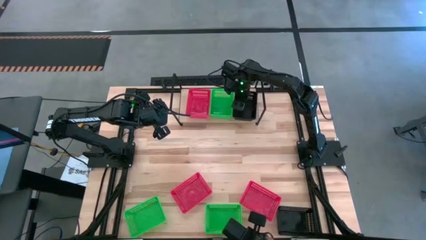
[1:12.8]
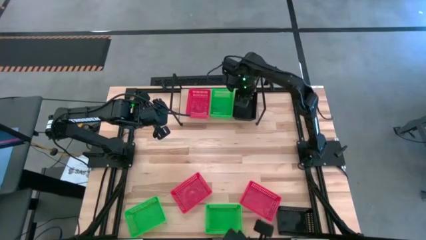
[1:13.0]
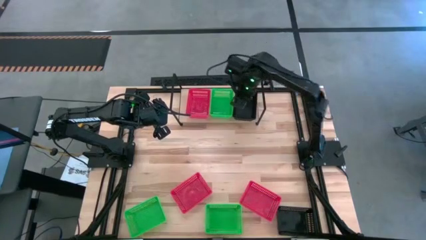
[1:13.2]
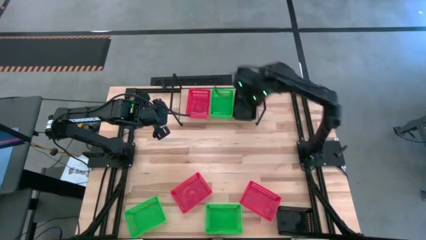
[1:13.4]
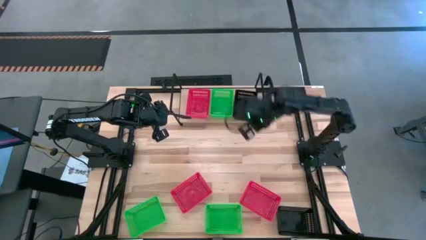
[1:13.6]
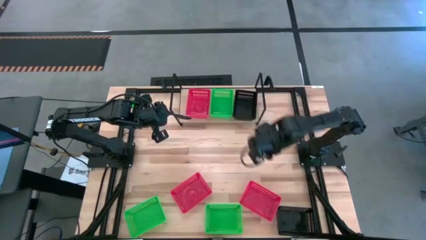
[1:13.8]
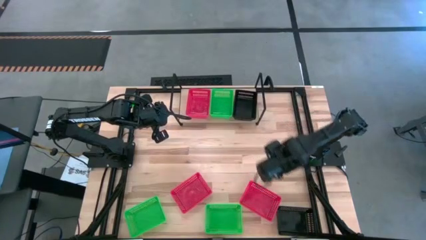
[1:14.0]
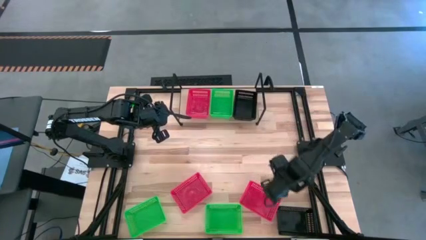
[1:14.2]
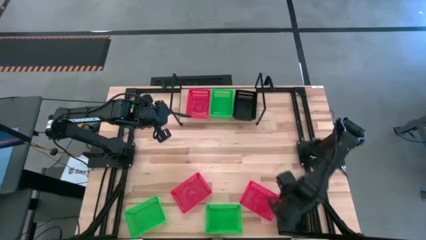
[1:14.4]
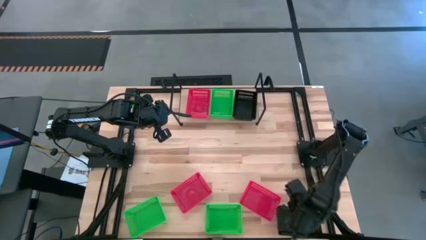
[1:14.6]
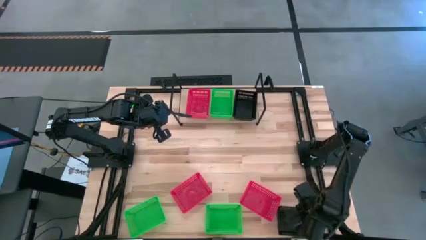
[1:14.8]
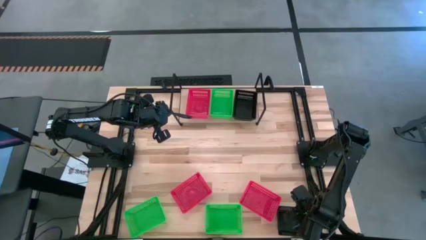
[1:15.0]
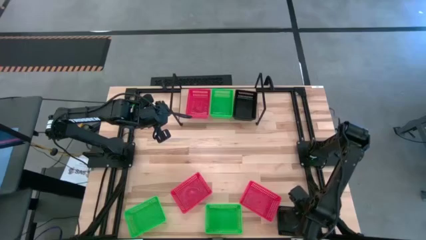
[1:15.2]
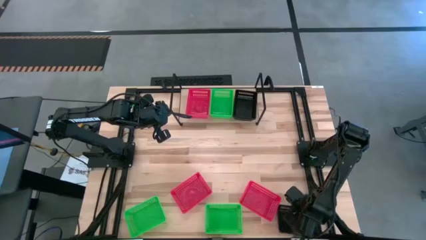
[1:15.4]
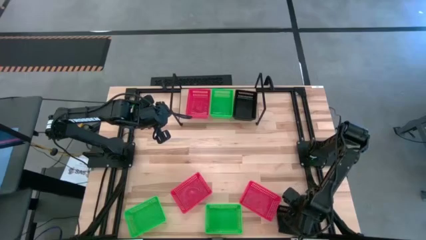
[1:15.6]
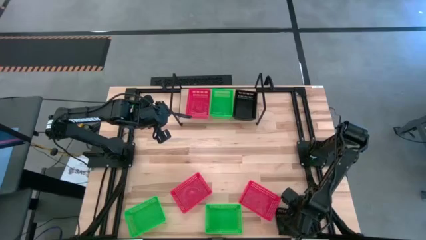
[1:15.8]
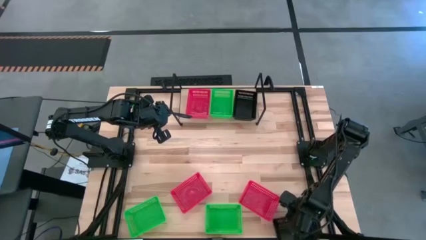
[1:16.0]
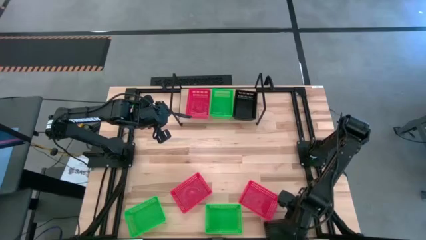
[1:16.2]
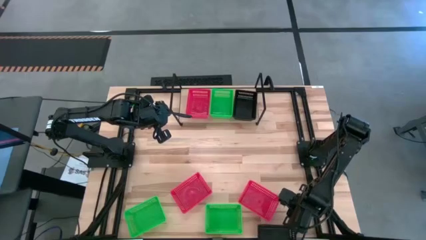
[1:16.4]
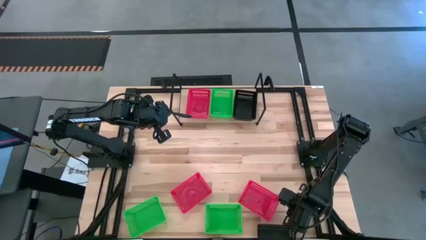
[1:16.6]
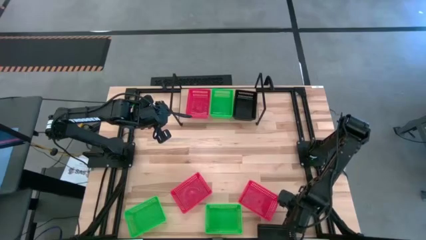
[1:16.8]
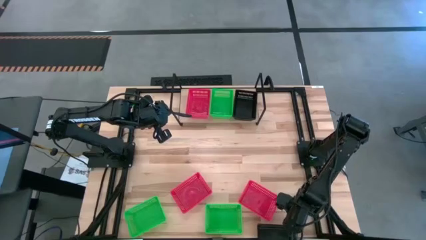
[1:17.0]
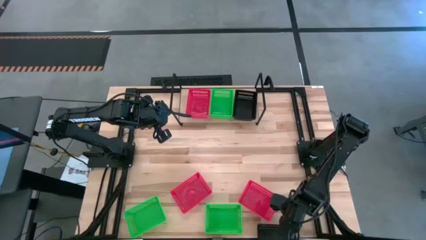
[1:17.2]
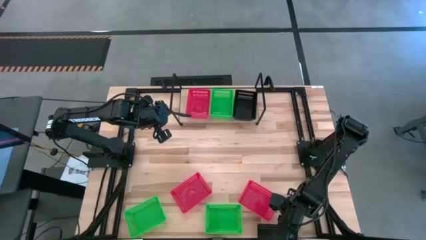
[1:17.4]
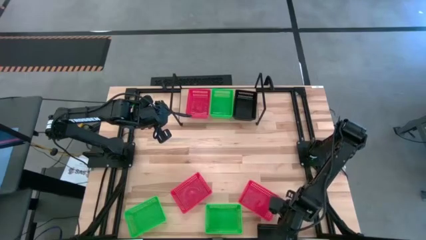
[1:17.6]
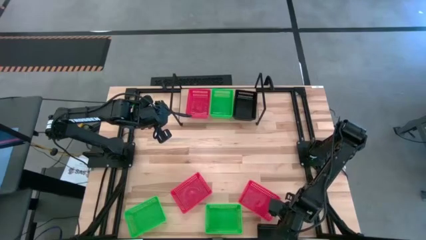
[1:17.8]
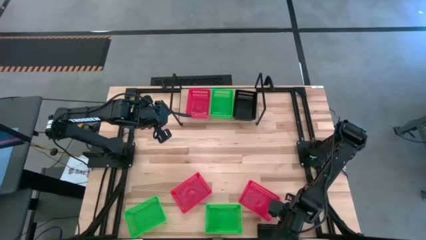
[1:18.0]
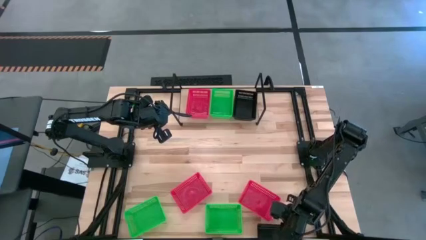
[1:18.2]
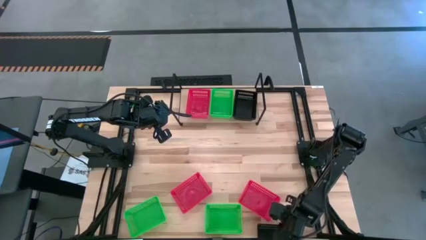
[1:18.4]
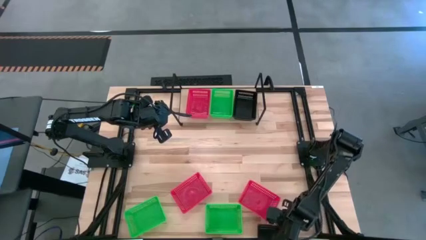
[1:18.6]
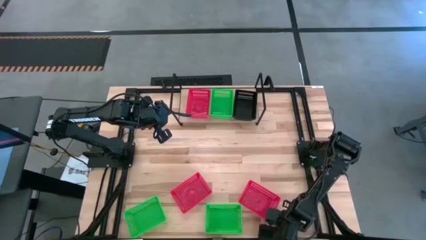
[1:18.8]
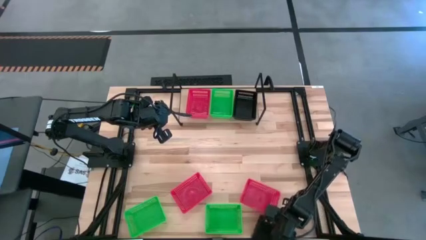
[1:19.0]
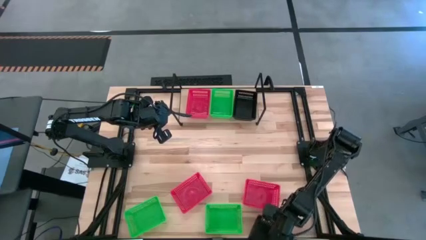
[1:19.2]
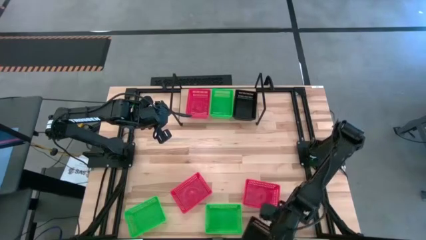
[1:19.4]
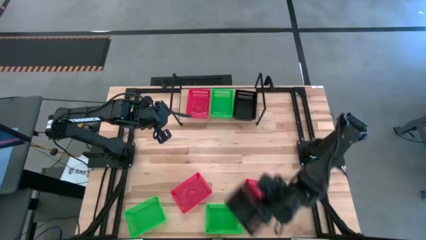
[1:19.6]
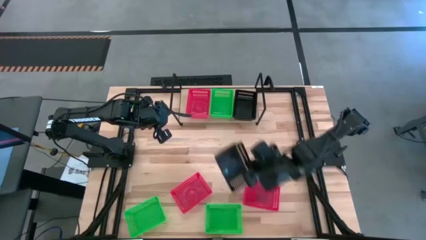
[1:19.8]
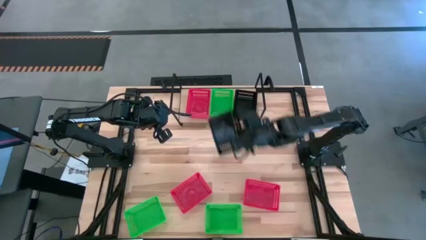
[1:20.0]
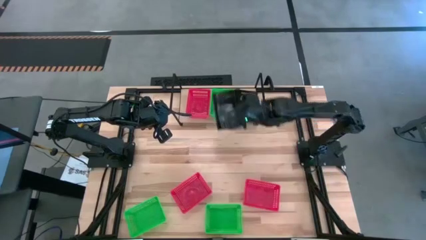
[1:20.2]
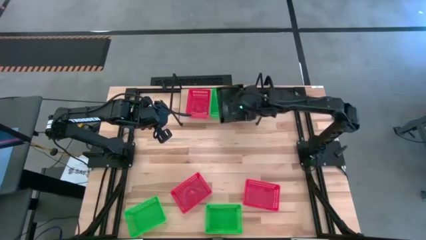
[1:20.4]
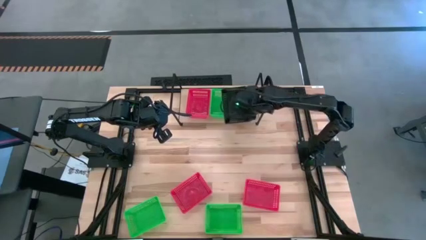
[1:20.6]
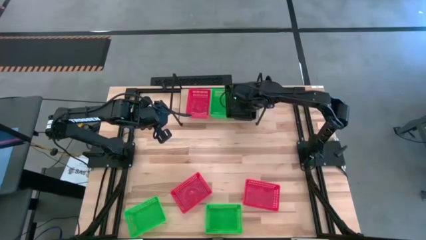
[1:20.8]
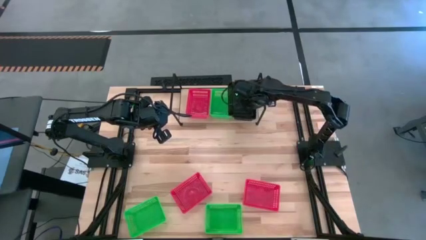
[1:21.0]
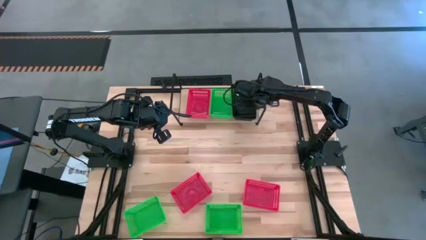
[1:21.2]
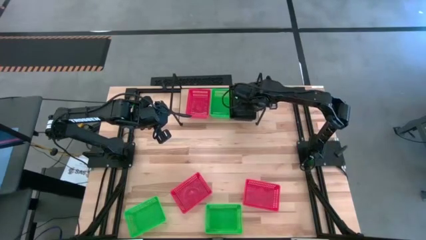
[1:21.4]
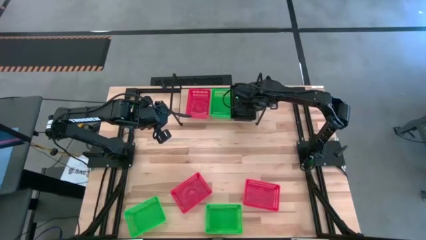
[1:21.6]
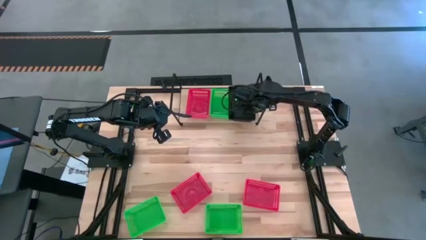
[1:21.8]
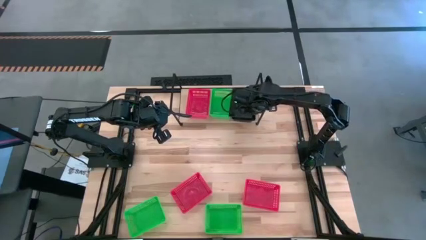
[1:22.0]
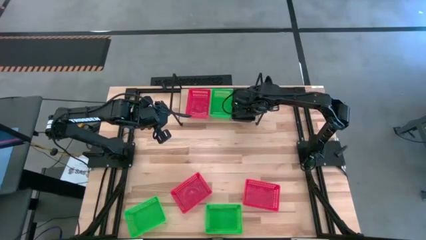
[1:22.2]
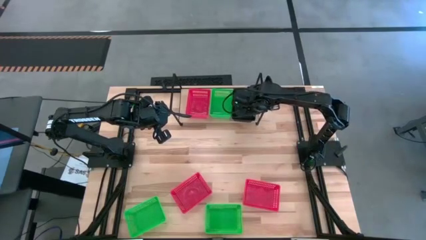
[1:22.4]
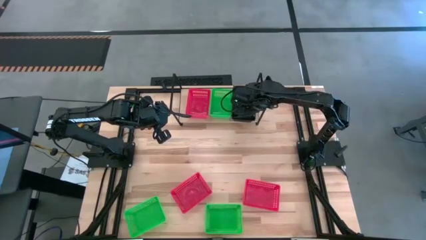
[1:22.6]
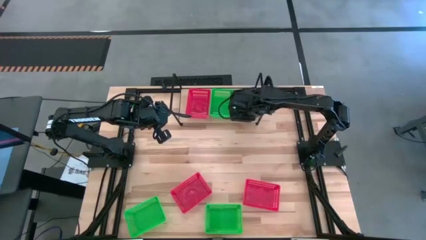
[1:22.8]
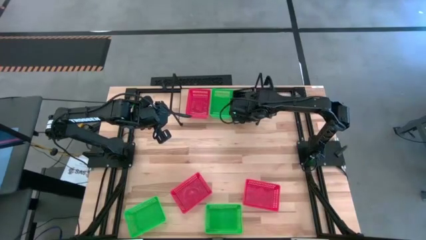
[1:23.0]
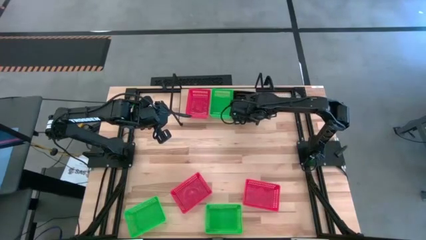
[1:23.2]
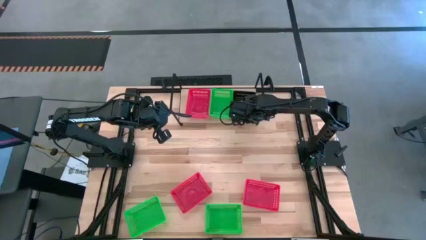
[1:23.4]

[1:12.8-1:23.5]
Task: Stack baskets on shelf by color
Stack the black bin on top of the other black bins on the shelf

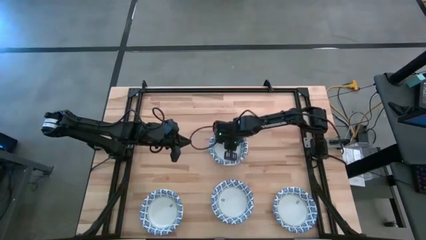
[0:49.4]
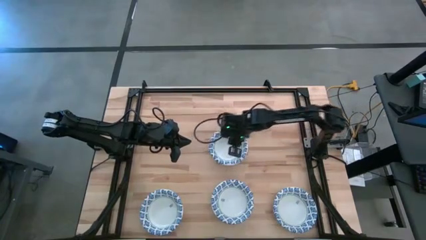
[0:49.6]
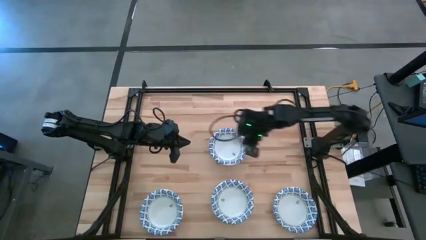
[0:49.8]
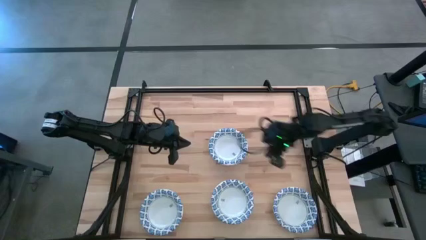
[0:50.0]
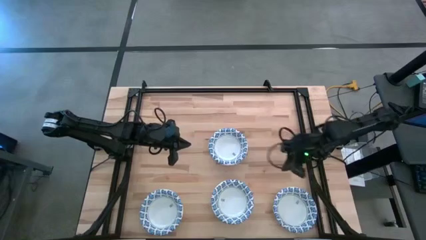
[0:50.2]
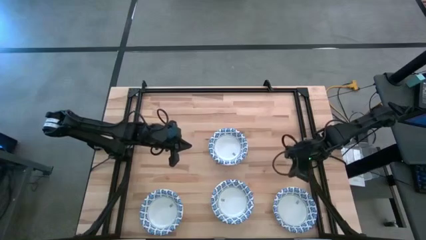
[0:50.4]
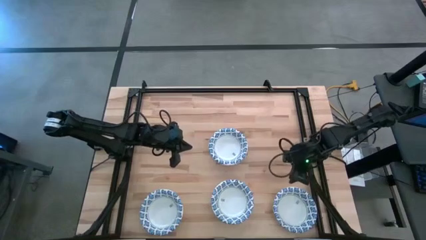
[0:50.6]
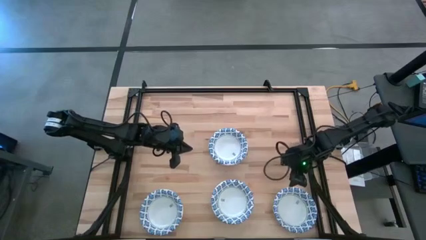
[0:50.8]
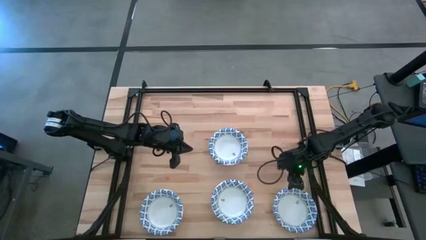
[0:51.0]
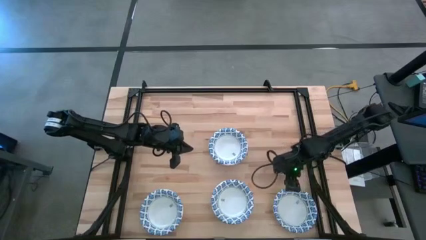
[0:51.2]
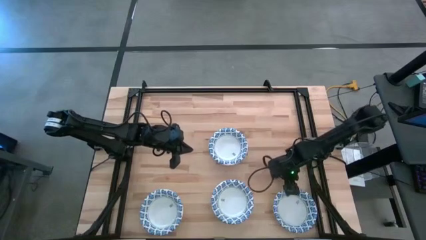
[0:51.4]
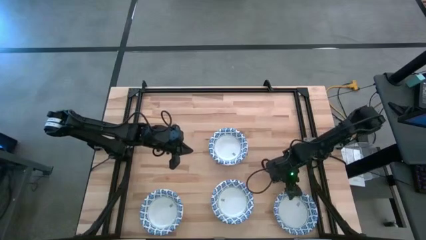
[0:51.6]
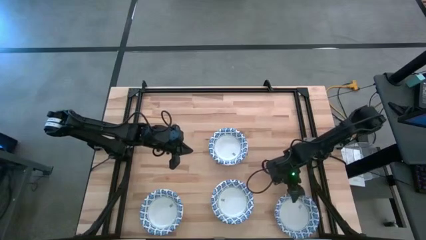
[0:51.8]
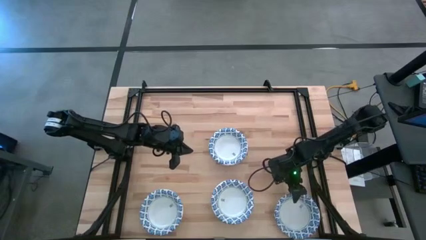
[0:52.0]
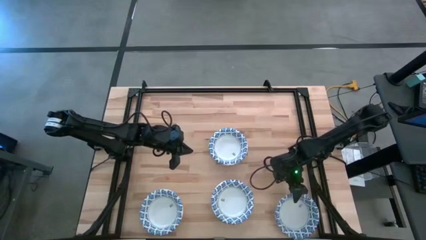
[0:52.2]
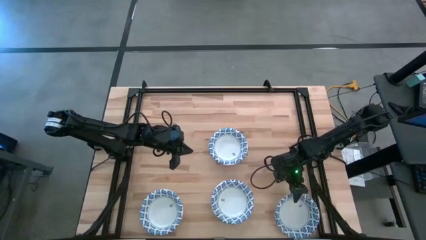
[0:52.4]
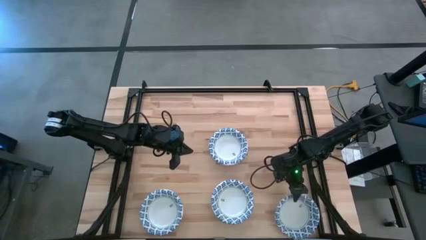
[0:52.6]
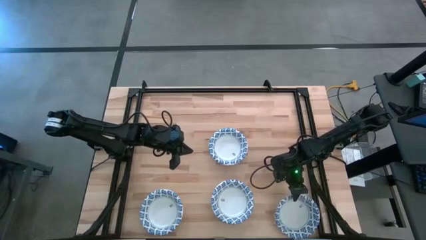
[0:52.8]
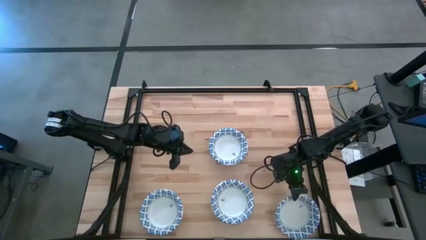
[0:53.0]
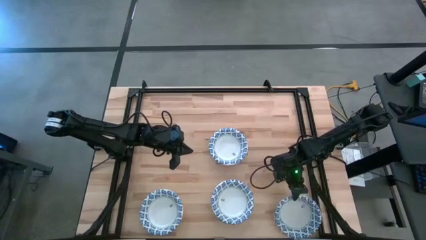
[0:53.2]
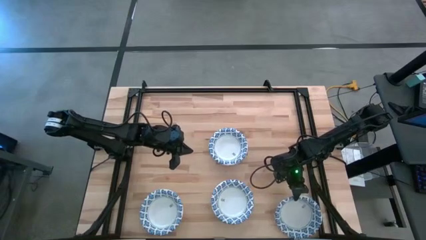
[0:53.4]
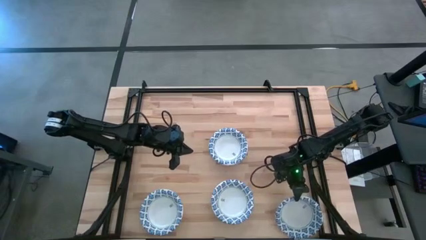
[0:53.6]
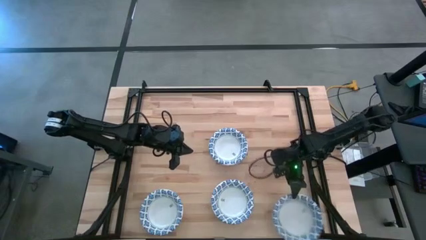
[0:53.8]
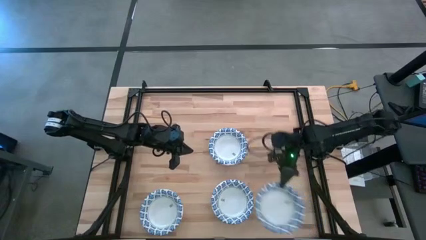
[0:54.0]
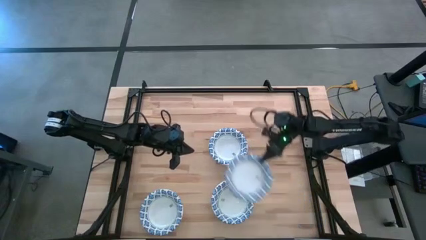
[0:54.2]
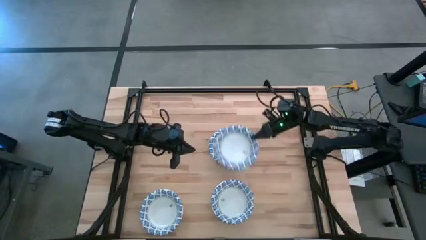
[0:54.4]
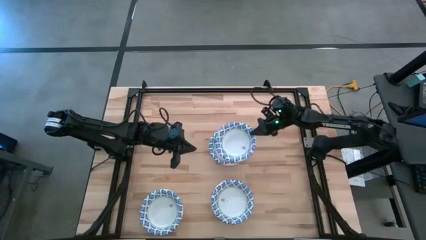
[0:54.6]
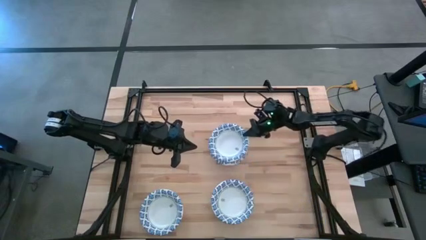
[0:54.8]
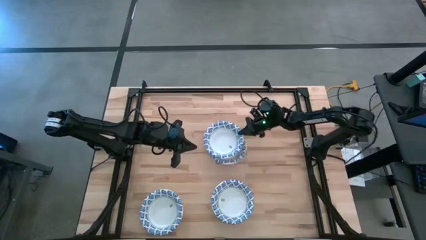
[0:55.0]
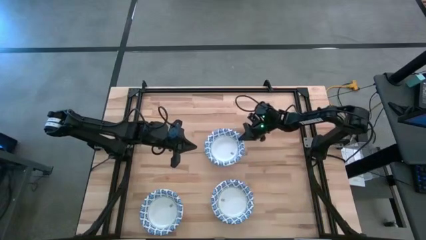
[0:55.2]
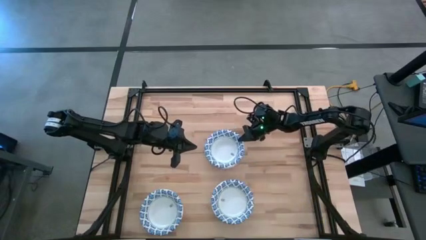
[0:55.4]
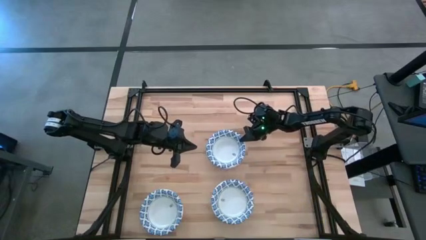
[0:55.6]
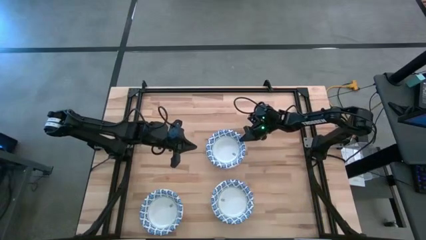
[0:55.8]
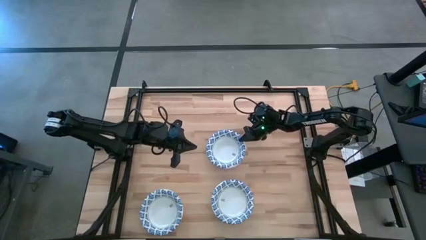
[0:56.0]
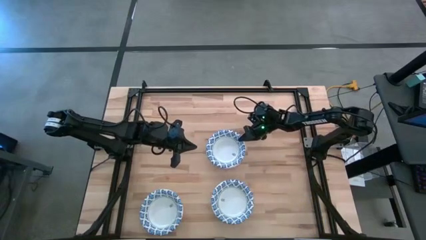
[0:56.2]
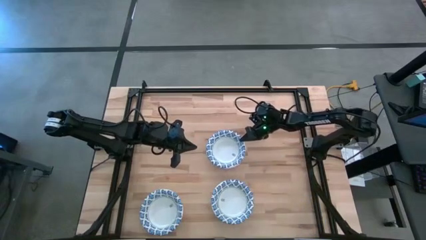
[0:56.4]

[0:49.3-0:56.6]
Task: Nest bowls inside each other
Stack the white patterned bowl on top of the center white patterned bowl
